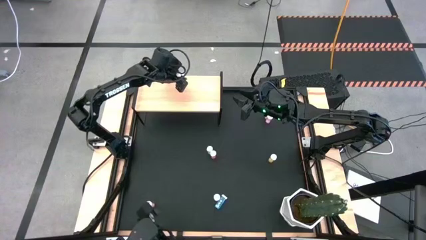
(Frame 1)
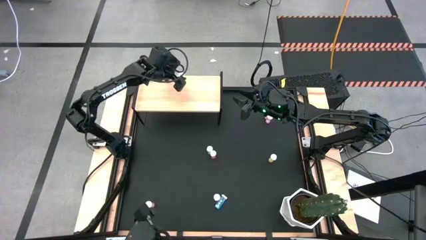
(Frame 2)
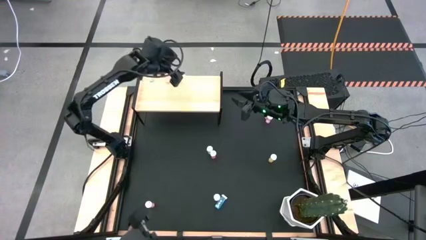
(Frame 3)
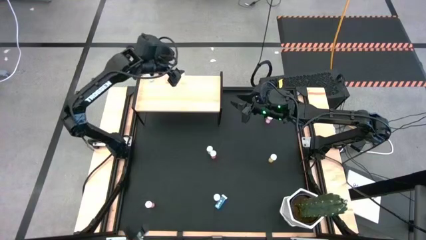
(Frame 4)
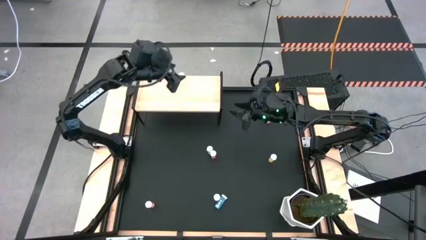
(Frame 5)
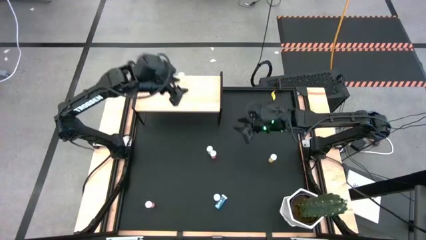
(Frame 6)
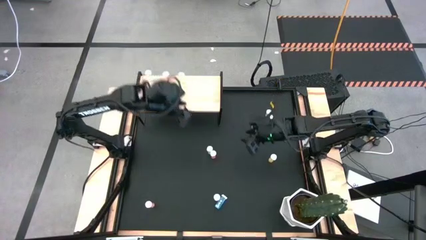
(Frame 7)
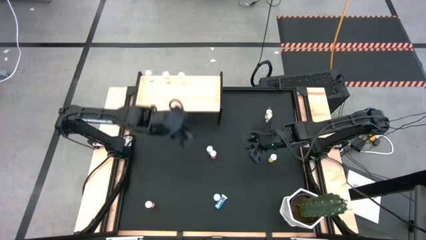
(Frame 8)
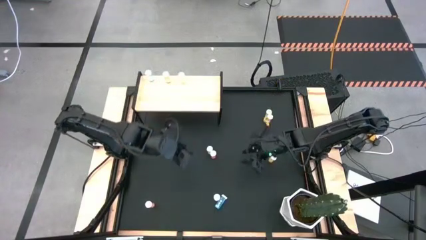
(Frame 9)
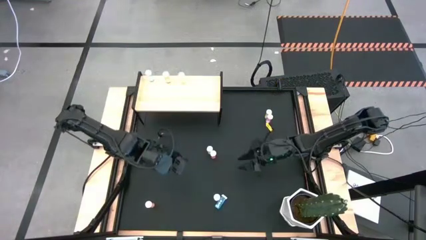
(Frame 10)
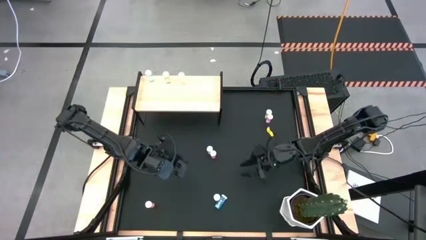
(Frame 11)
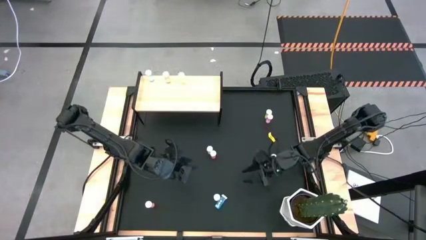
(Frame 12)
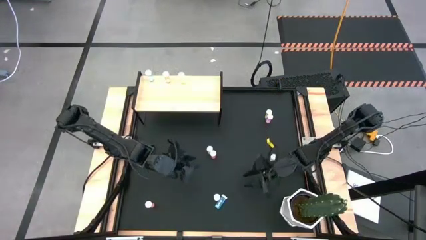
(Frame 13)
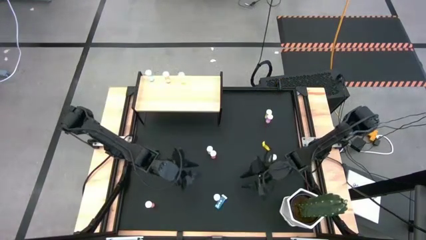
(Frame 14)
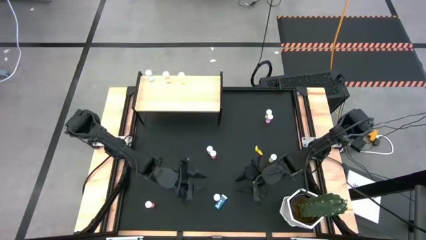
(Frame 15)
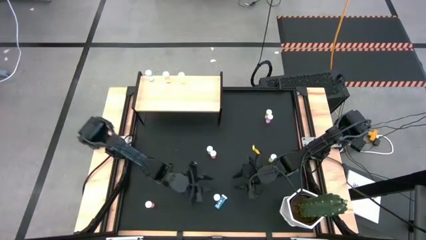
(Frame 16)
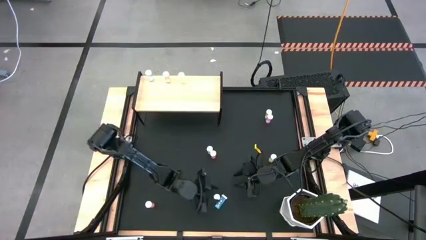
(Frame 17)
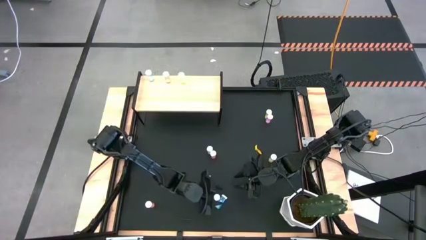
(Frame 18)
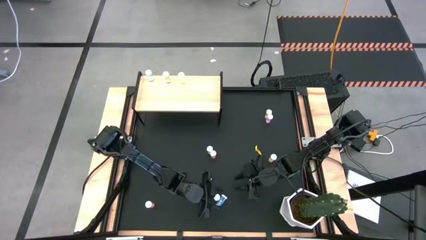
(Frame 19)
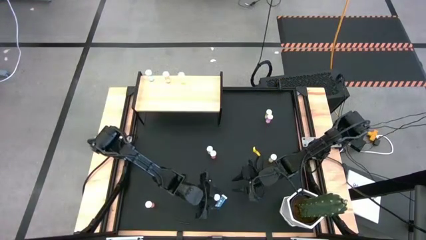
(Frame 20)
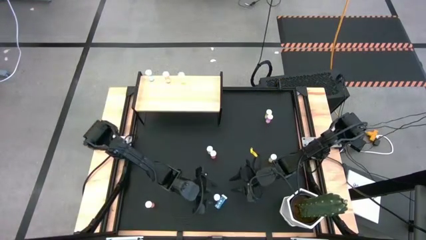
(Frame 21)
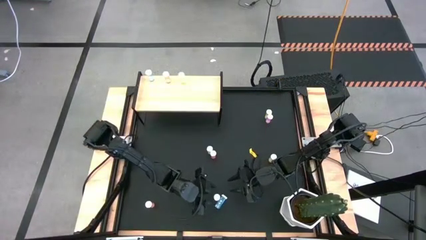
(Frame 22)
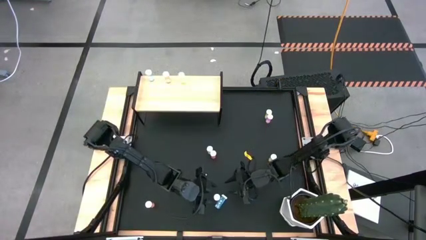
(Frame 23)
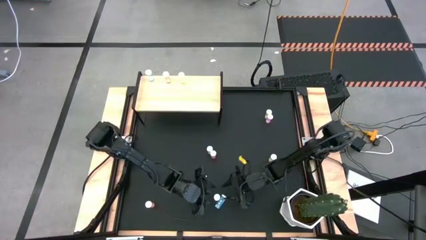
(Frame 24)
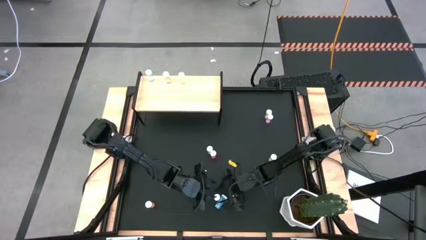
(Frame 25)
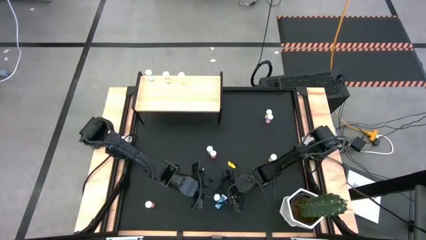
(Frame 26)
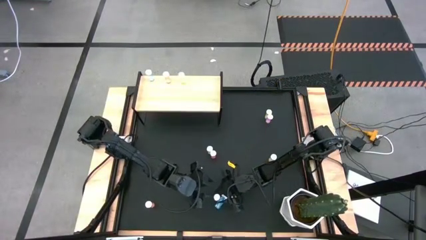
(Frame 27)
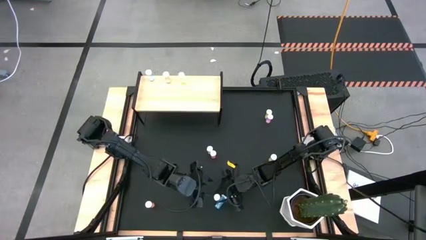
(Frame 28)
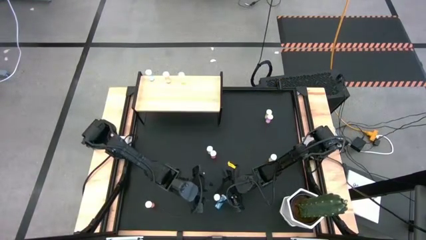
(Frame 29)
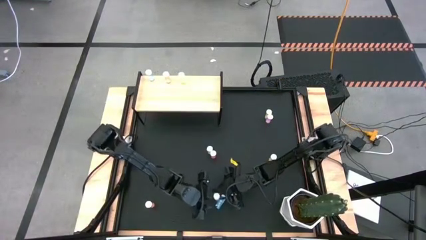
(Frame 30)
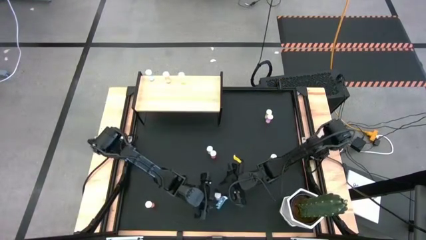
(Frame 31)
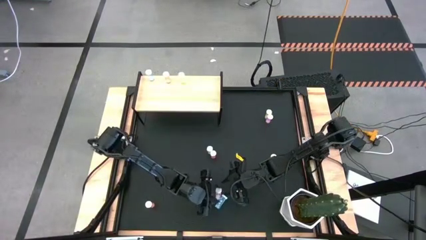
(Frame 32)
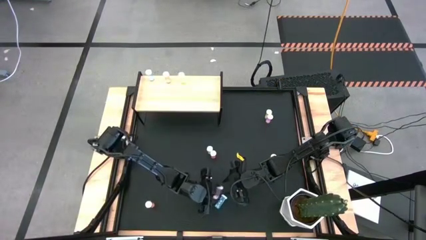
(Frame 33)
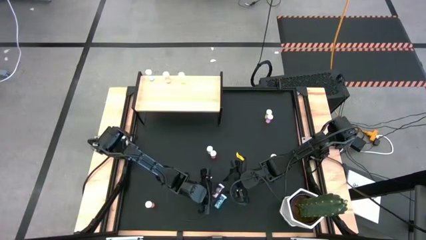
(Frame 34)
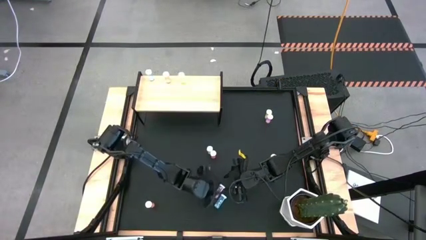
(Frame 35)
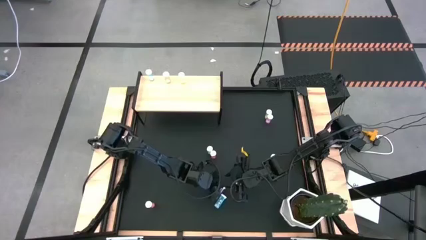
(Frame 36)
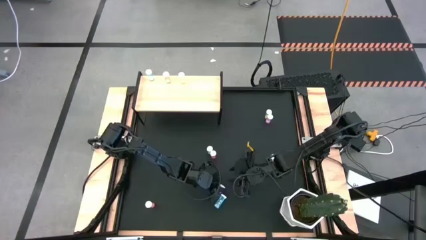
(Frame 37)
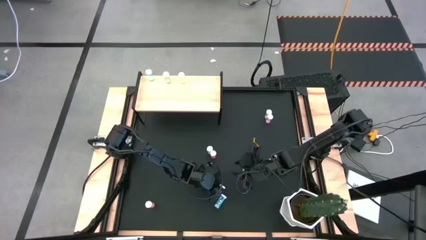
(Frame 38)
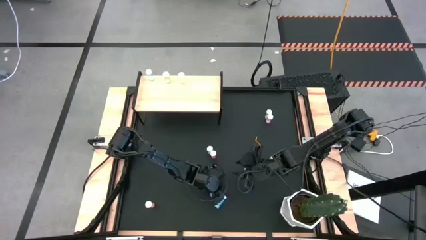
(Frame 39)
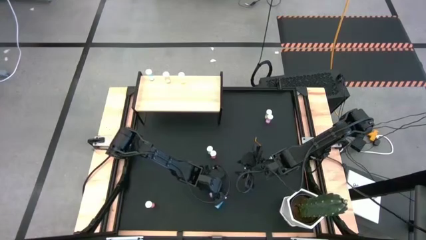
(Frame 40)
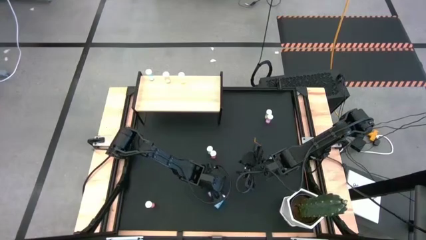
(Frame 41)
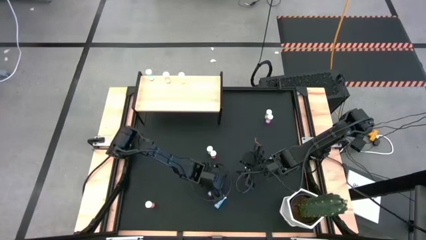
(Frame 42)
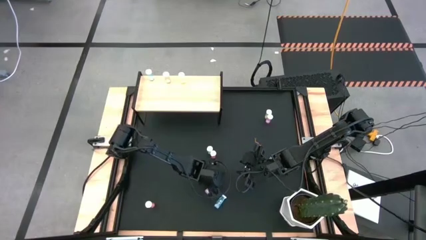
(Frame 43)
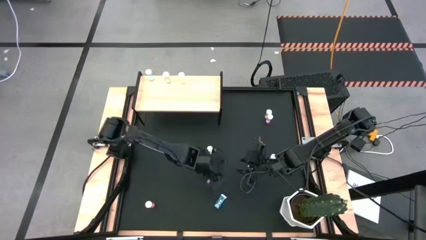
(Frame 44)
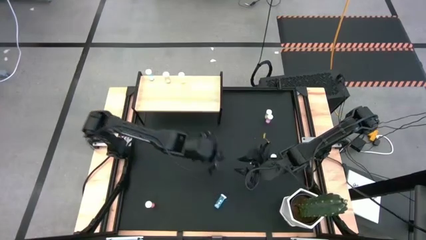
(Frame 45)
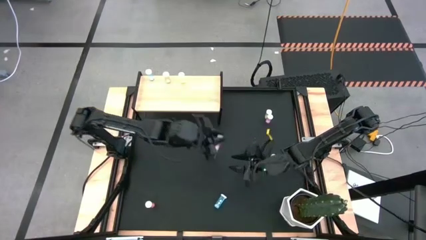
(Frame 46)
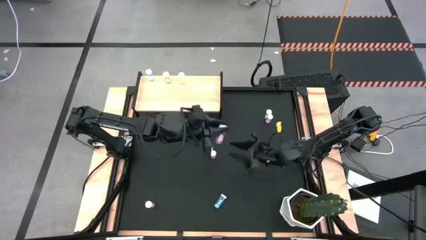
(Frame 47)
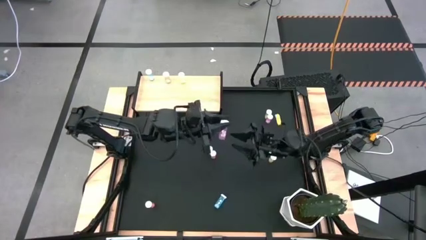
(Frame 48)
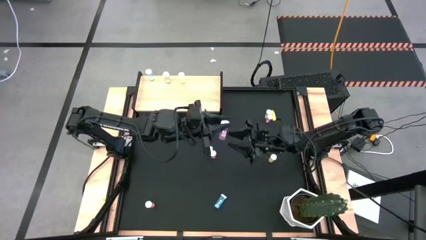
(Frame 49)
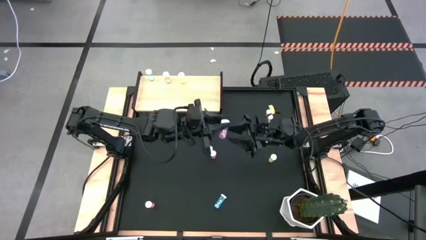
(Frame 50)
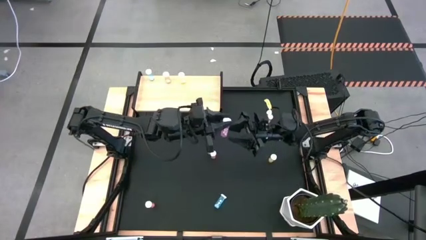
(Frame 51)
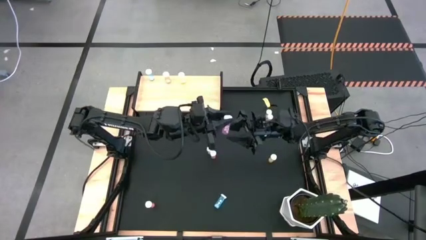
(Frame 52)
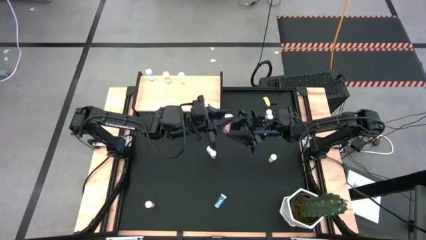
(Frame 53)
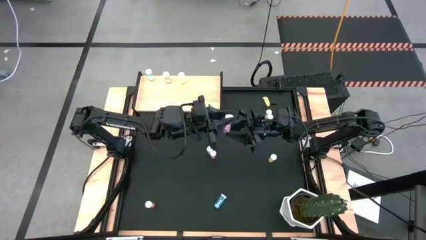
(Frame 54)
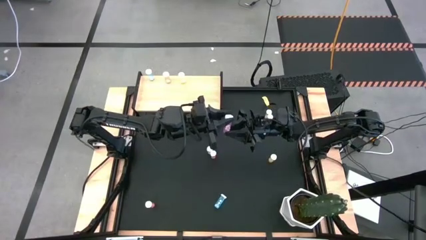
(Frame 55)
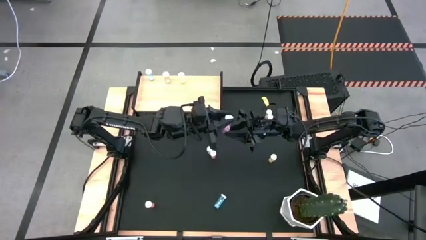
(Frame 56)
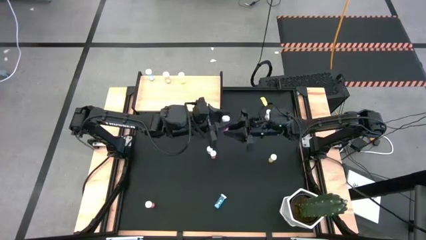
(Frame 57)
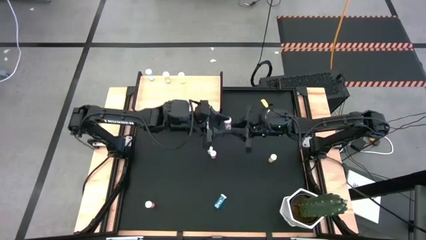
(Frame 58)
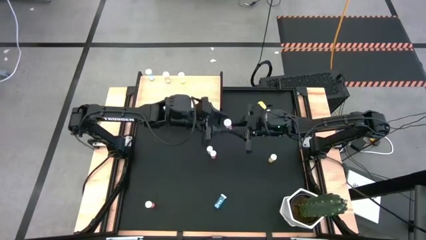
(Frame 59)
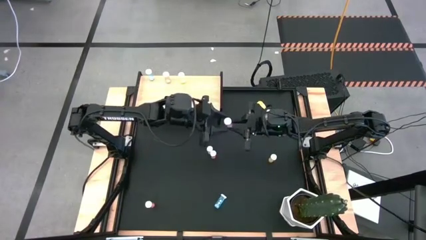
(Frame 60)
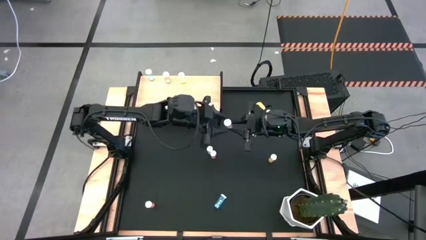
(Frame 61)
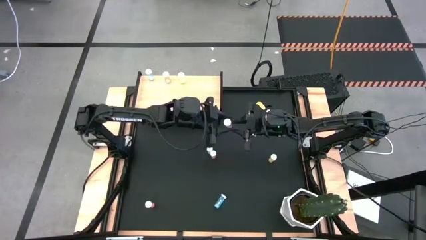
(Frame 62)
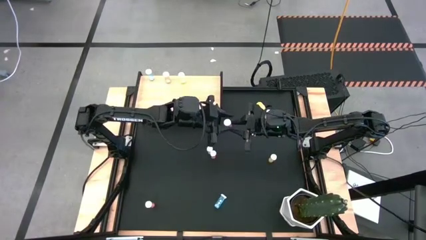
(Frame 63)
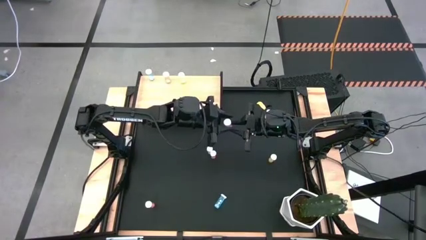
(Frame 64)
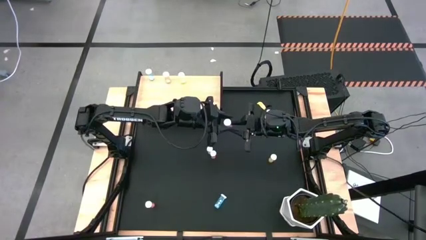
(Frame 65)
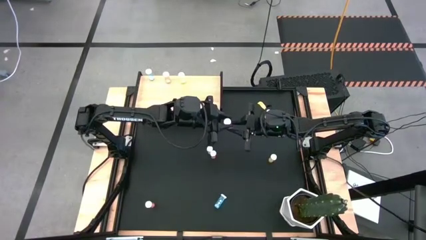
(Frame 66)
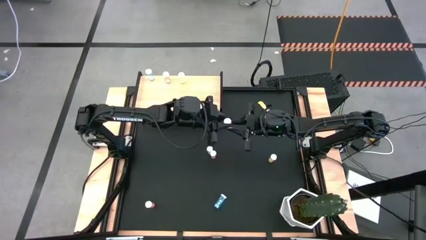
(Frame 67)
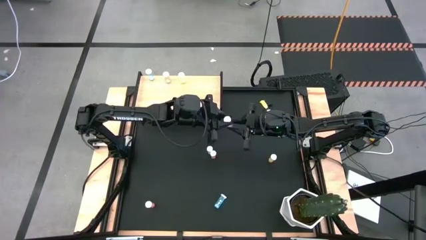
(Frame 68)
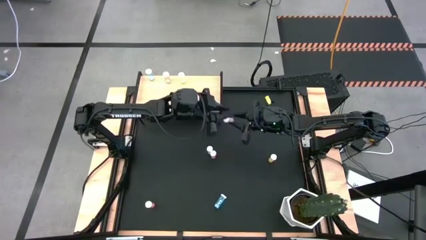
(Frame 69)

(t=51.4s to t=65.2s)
Task: Pick and place medicine bottles onto shelf by color
Put the bottom pink pill bottle on the shelf
